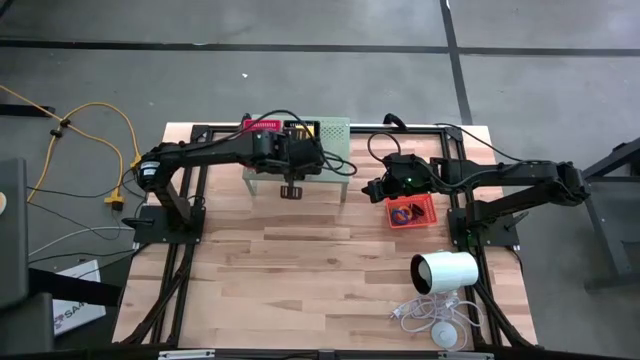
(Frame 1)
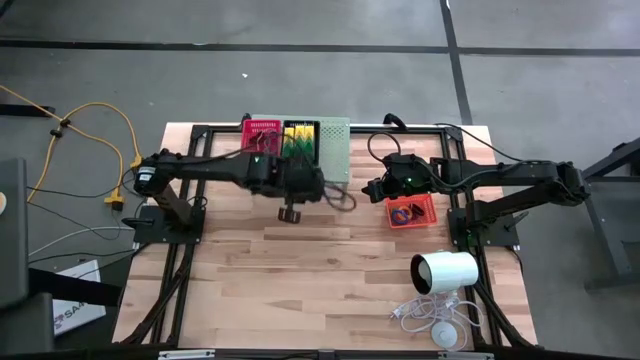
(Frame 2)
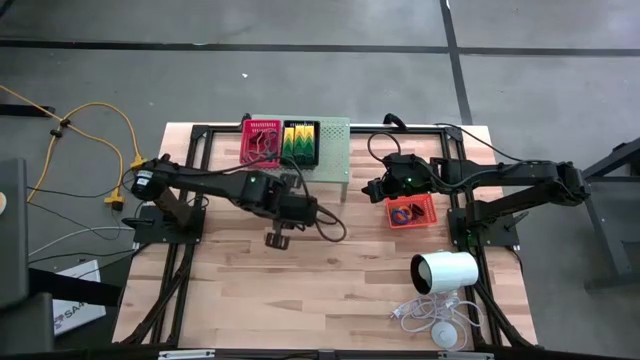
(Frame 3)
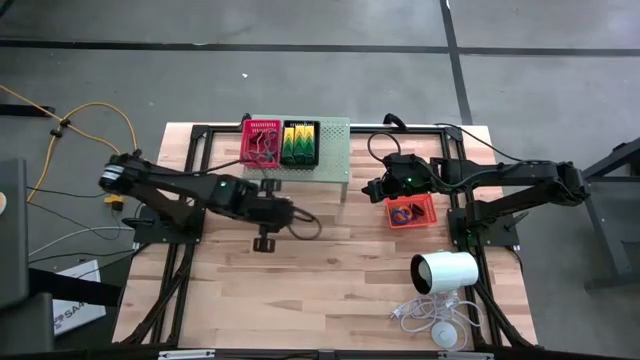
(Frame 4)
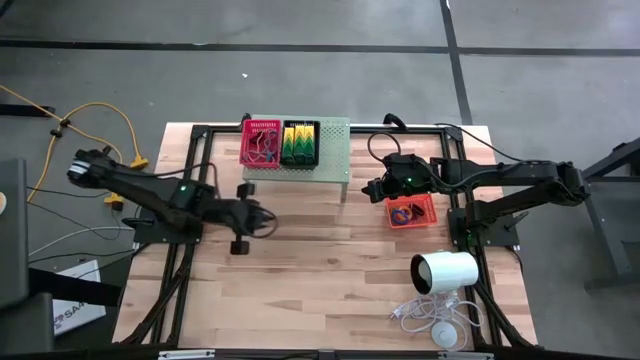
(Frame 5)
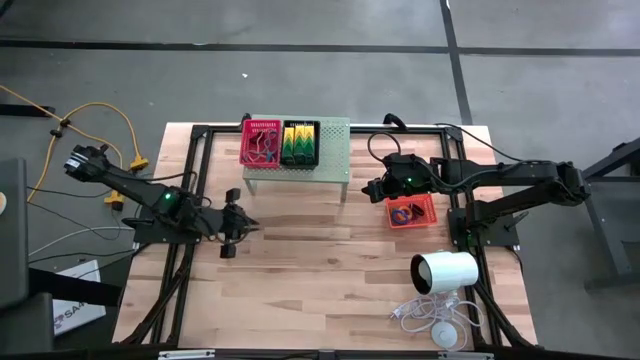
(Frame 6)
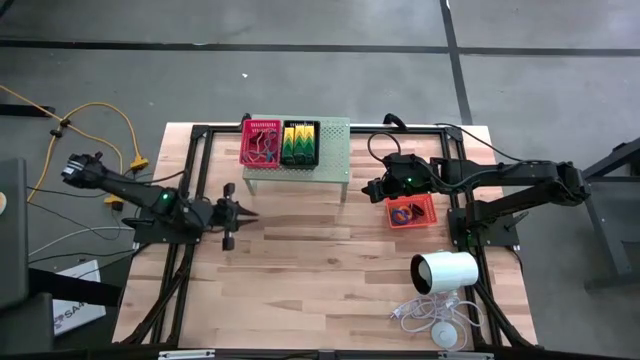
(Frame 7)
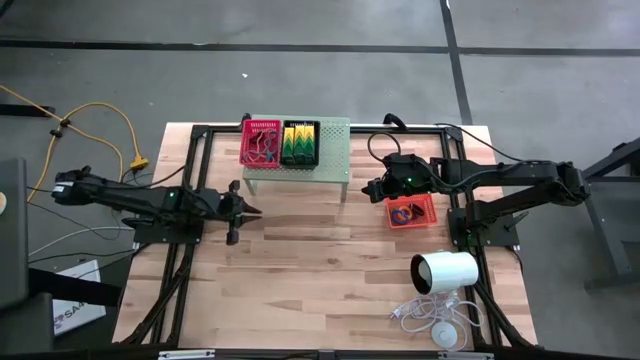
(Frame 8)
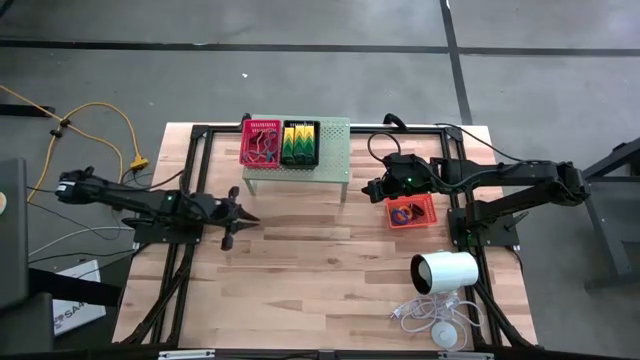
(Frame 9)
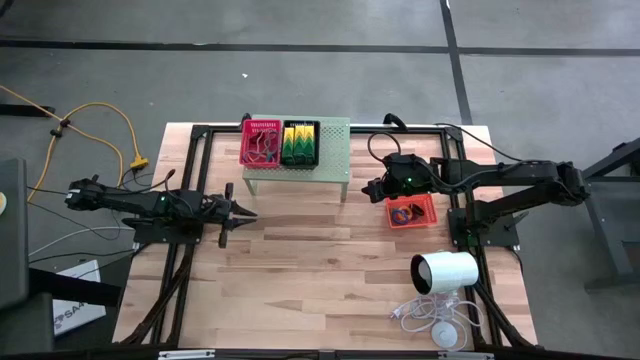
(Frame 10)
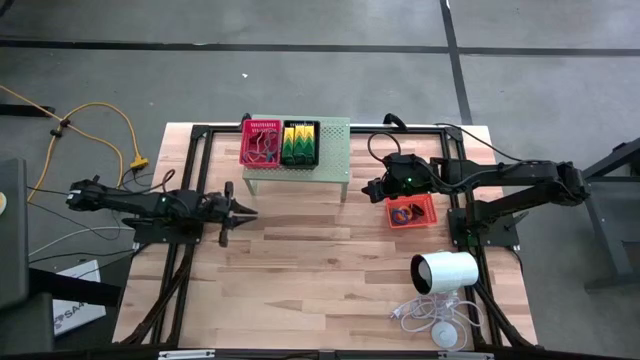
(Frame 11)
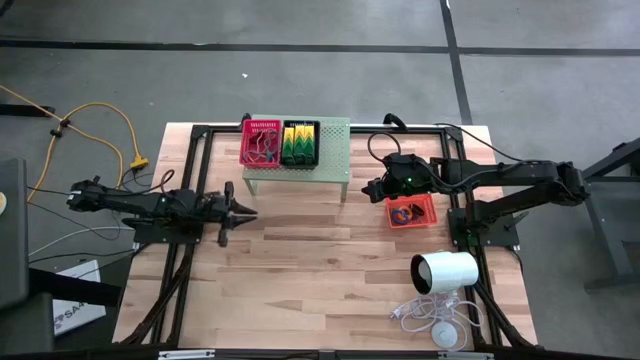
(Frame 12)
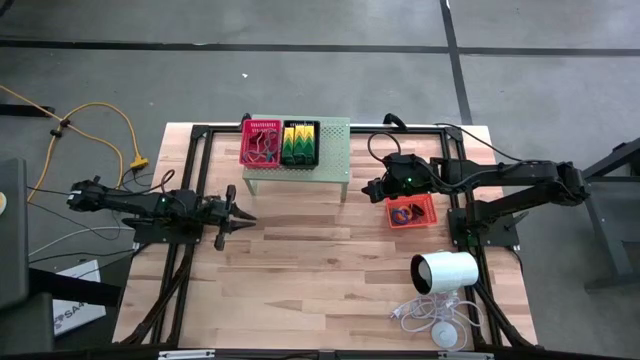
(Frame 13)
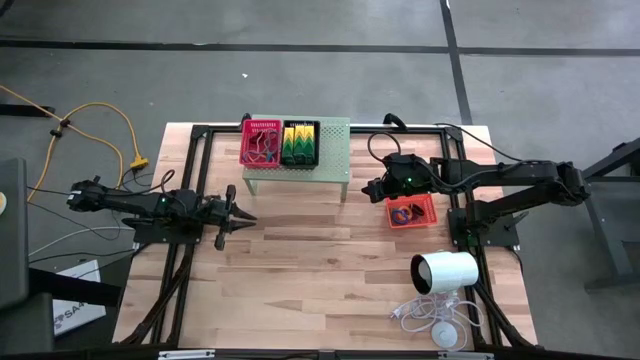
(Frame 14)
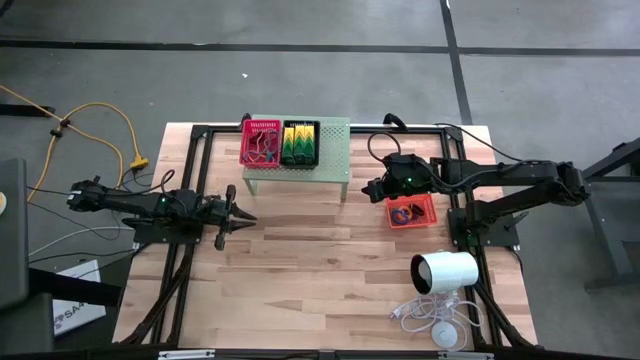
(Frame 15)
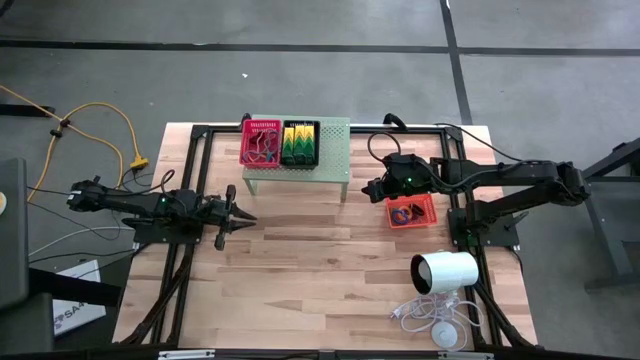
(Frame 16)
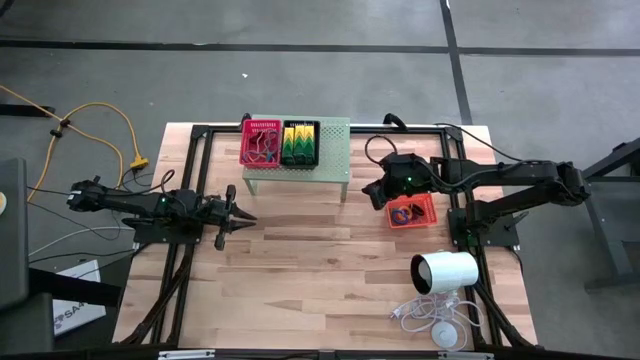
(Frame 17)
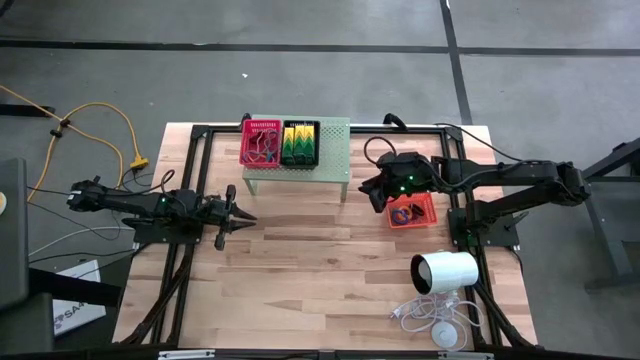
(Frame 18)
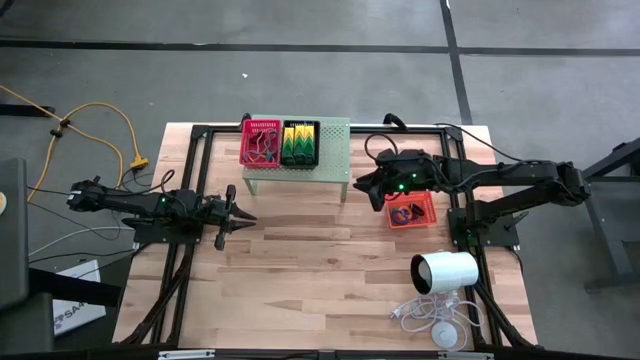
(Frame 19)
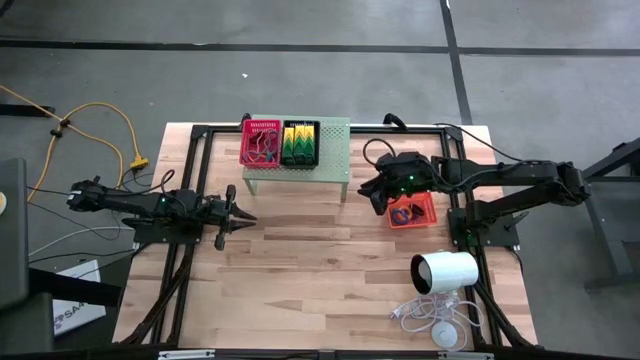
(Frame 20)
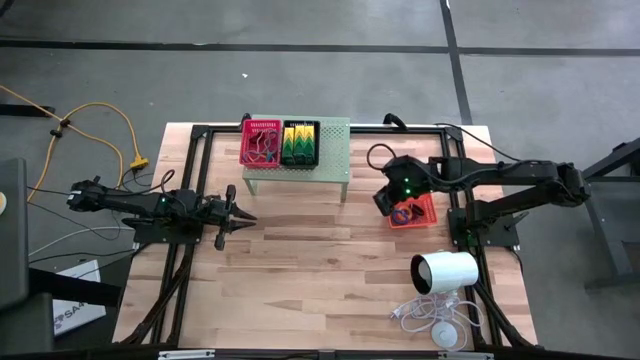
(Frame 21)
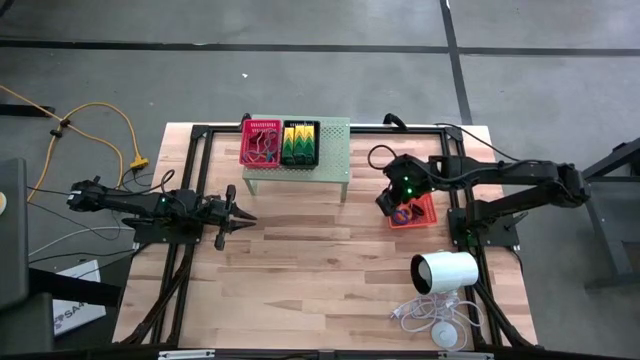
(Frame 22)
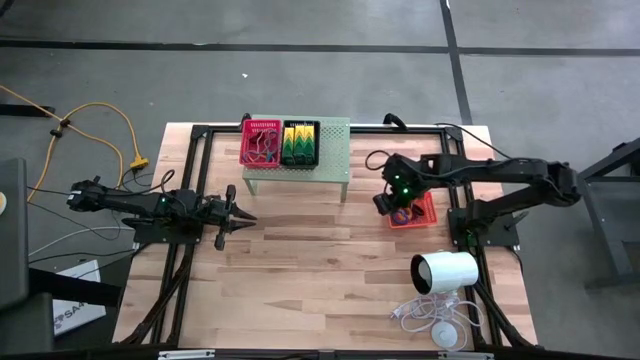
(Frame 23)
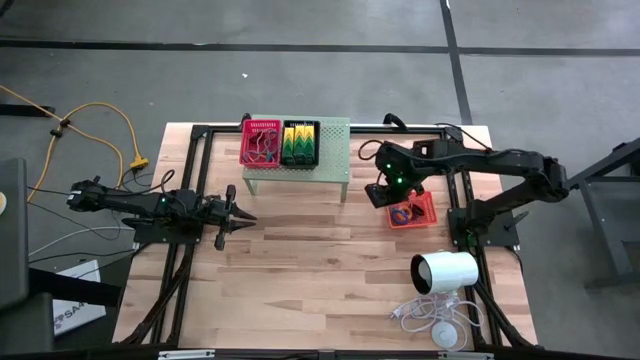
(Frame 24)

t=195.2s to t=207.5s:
Task: Pick & Place Office Desk Supplies
Put the orange bin on the shelf

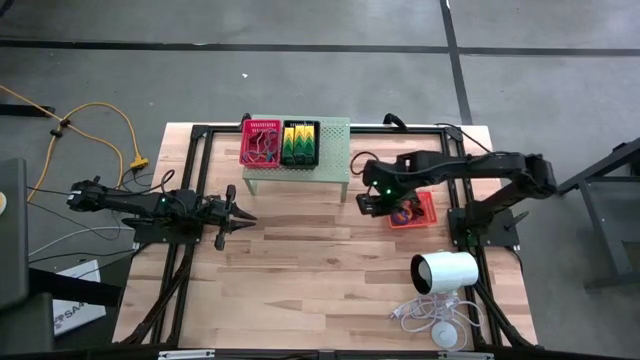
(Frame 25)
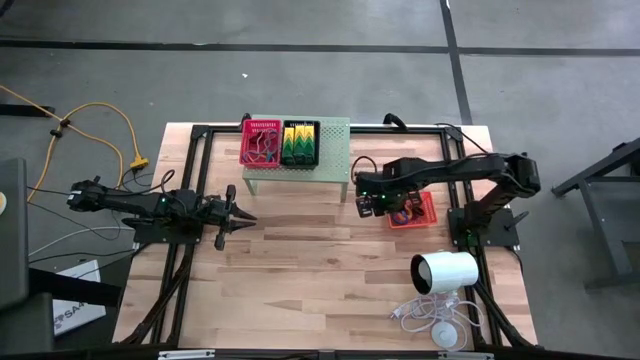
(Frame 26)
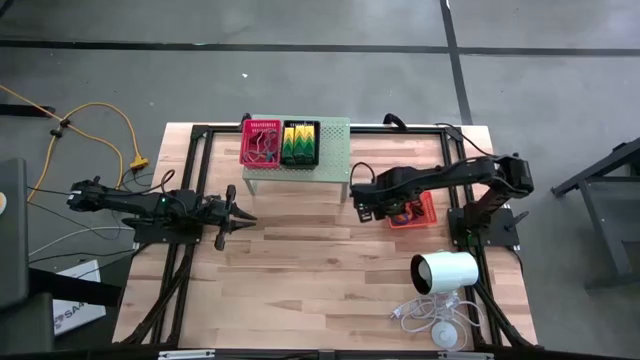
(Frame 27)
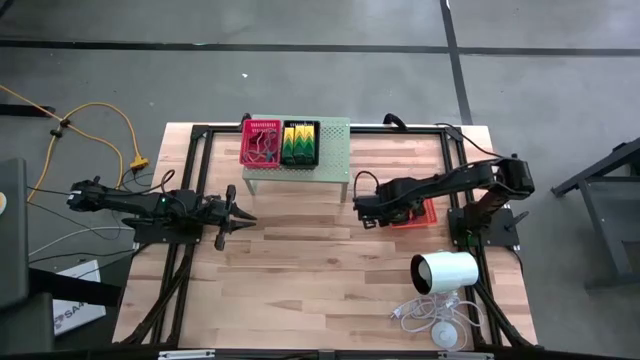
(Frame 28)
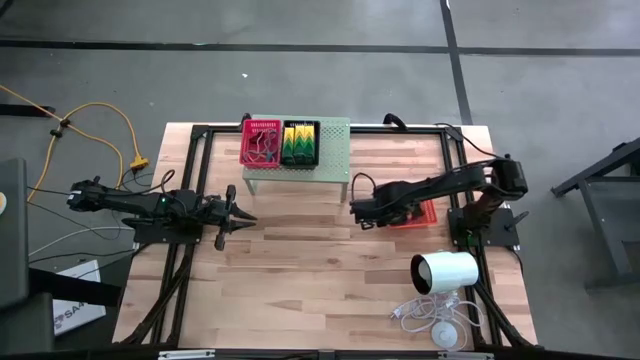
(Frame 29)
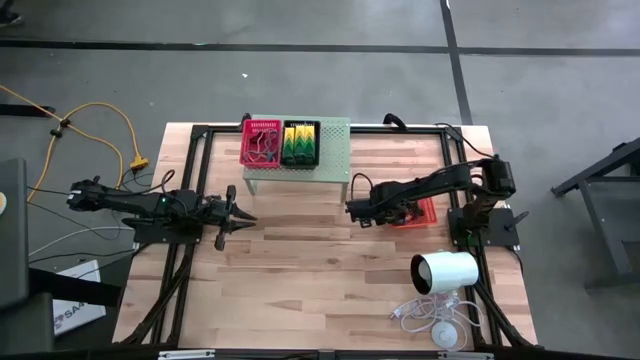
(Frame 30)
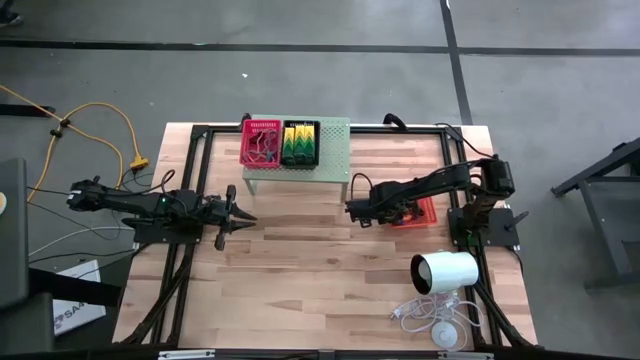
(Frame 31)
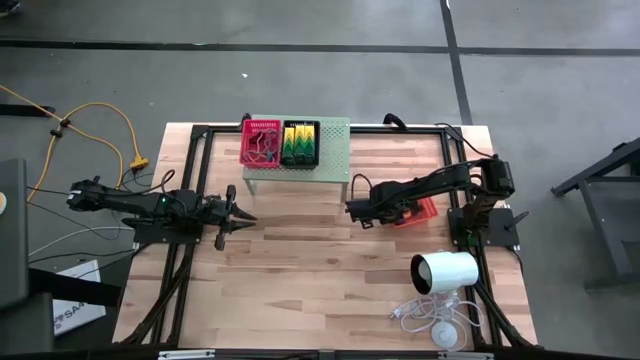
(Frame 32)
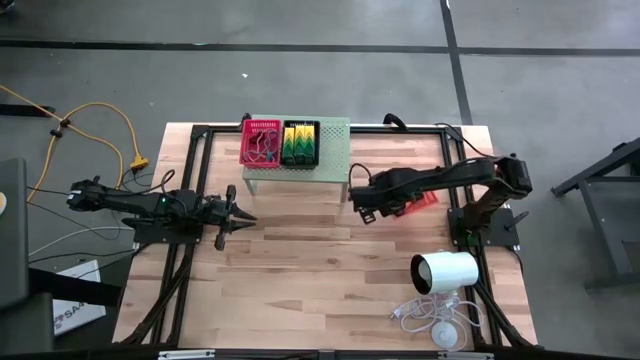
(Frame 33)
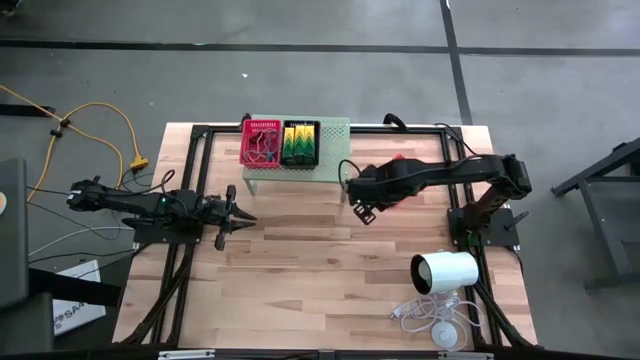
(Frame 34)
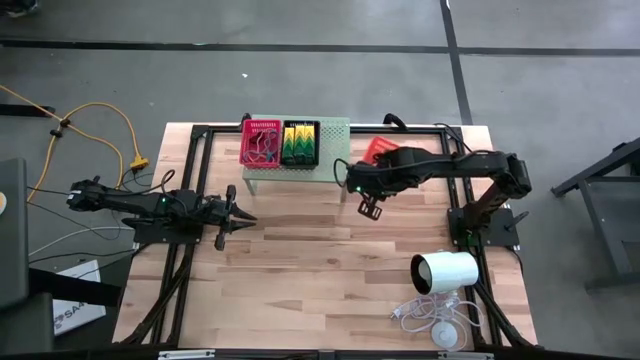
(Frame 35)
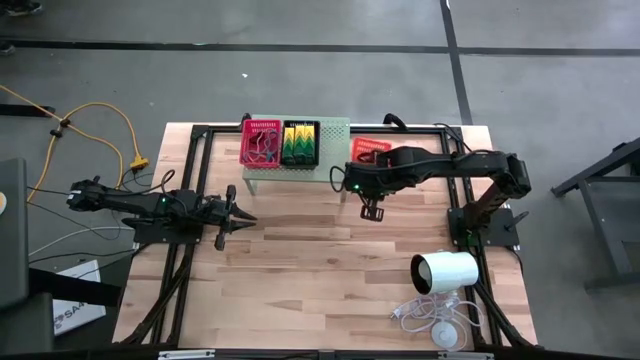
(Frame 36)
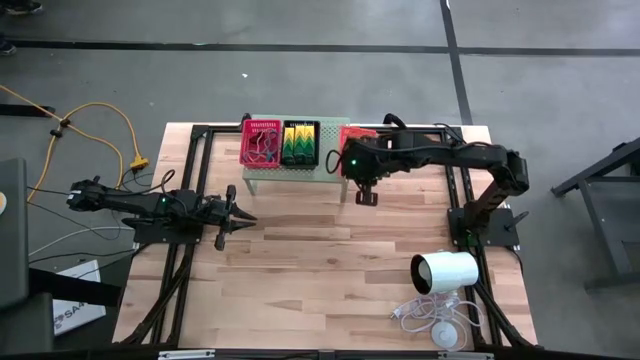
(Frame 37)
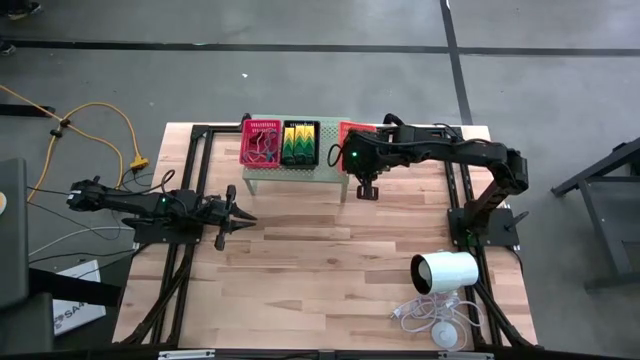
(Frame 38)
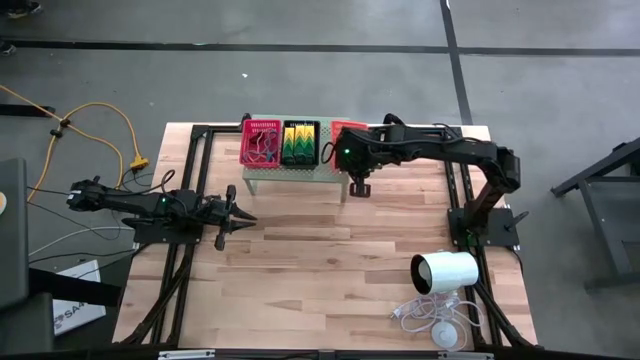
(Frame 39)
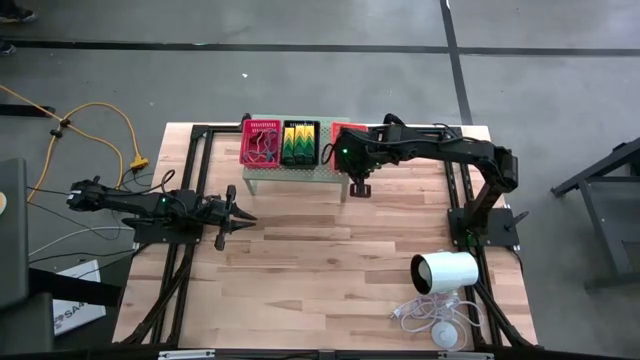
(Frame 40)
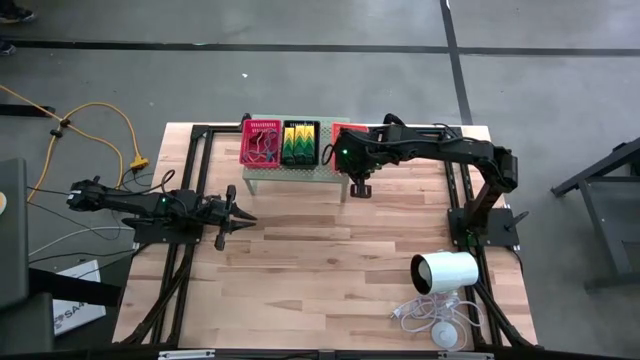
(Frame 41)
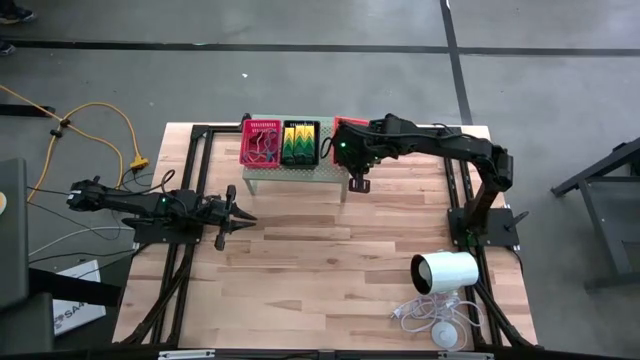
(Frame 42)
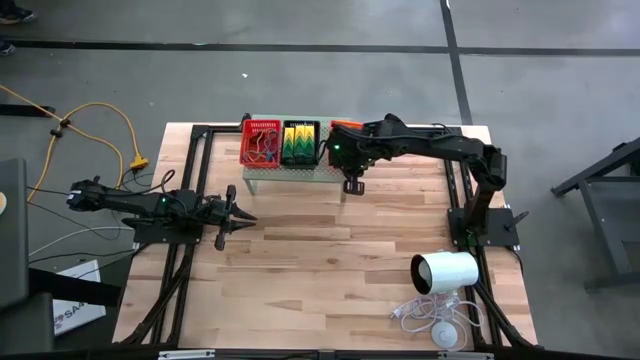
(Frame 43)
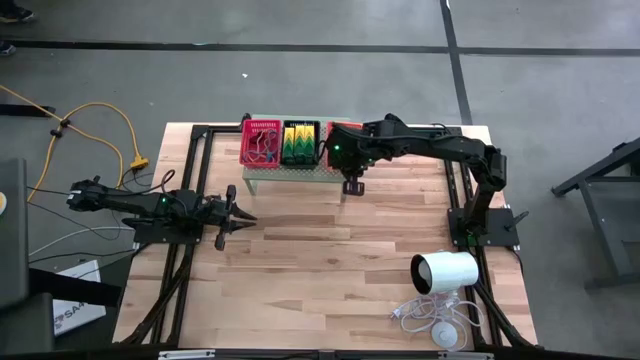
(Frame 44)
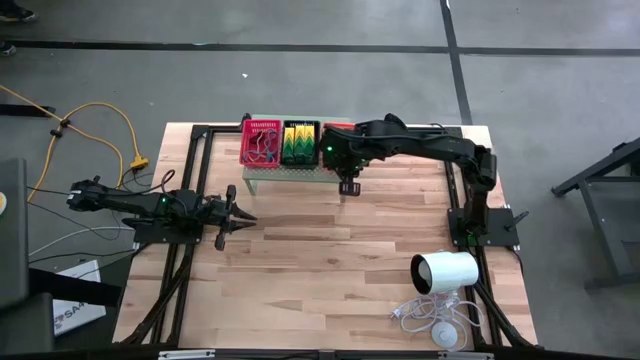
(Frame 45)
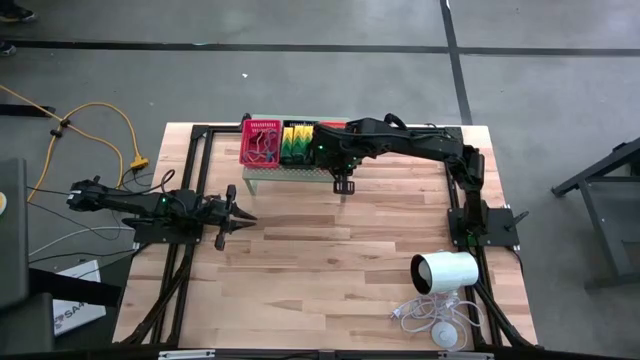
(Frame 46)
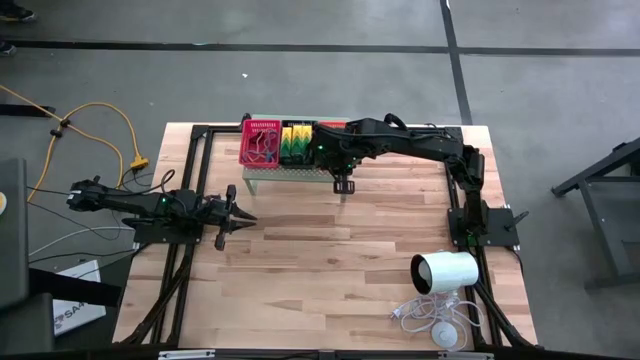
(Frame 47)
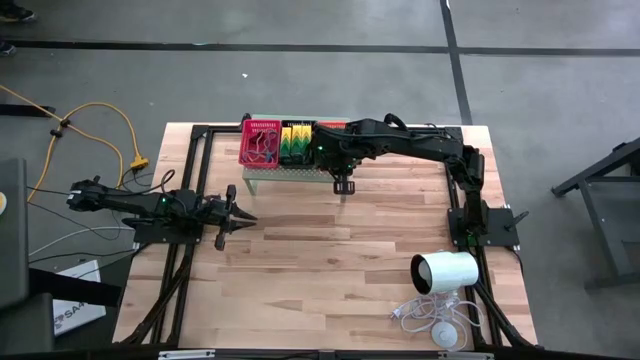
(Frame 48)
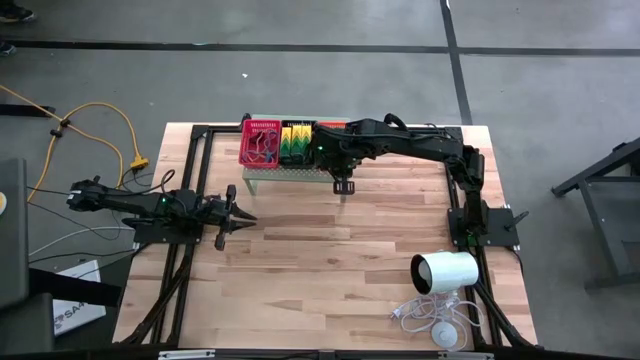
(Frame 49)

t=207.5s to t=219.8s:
Put the orange bin on the shelf
